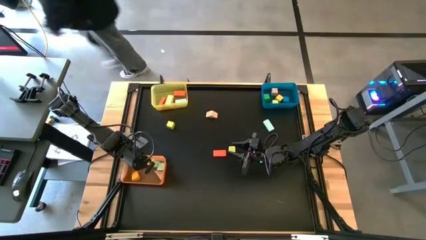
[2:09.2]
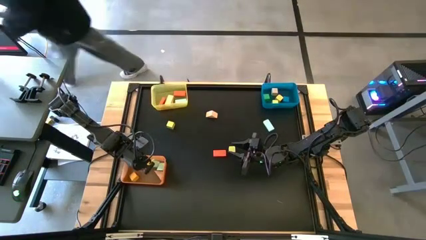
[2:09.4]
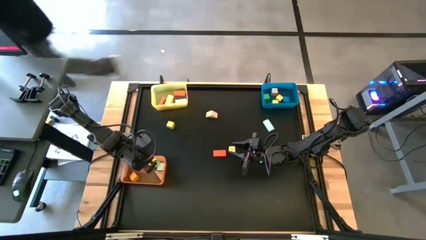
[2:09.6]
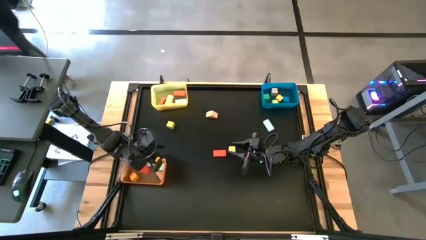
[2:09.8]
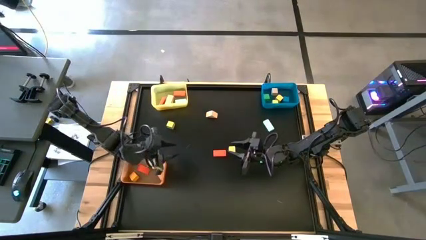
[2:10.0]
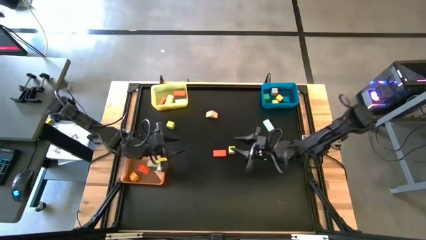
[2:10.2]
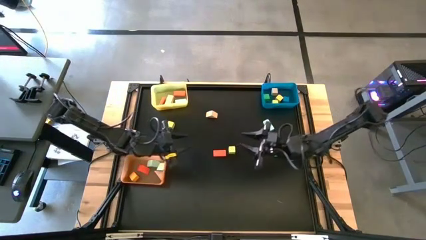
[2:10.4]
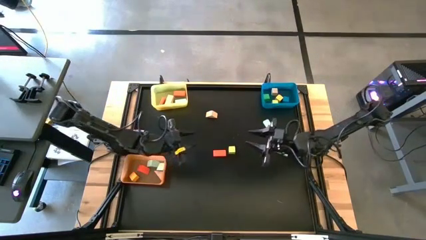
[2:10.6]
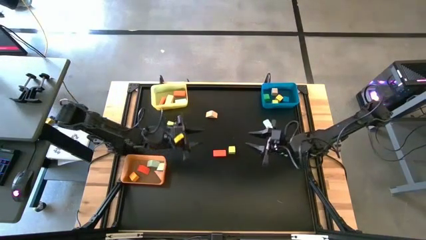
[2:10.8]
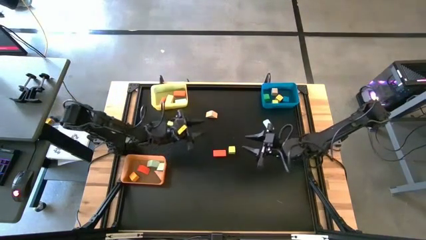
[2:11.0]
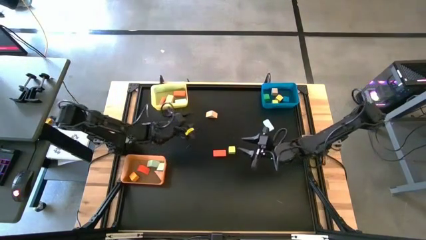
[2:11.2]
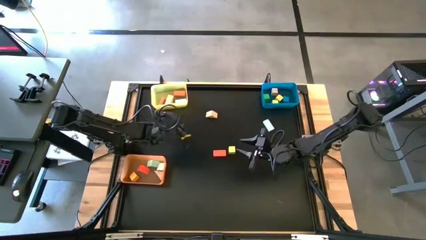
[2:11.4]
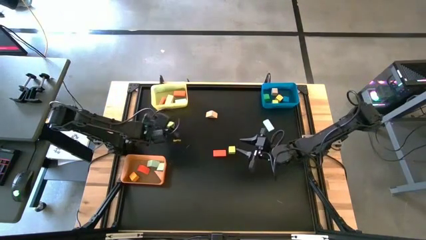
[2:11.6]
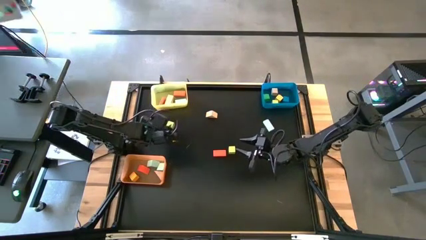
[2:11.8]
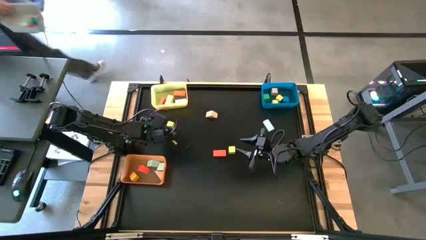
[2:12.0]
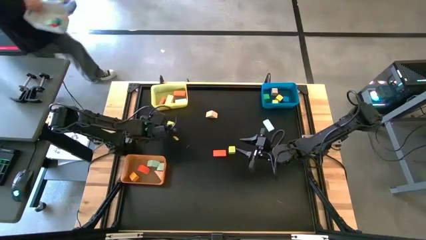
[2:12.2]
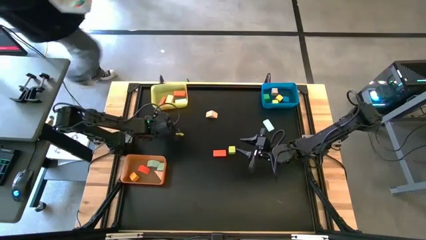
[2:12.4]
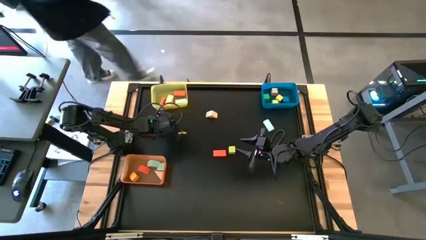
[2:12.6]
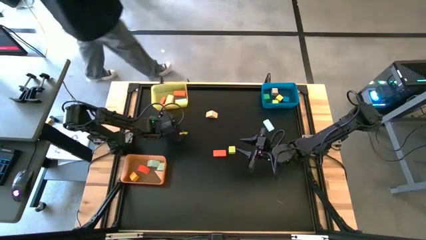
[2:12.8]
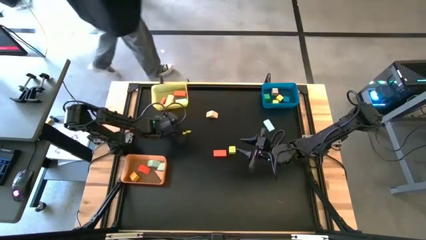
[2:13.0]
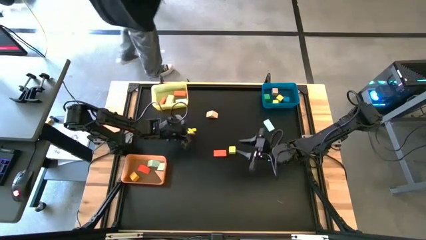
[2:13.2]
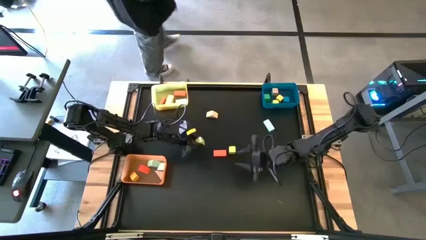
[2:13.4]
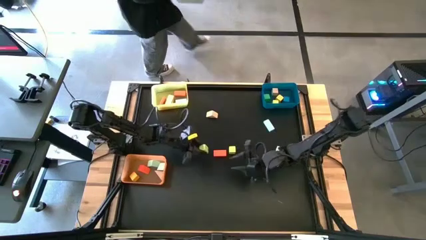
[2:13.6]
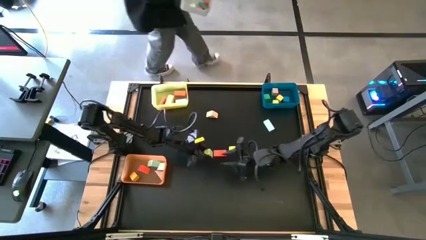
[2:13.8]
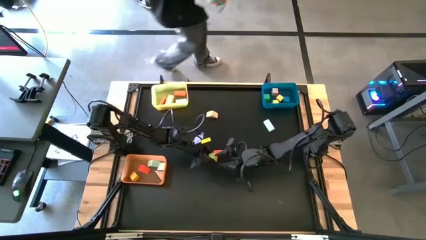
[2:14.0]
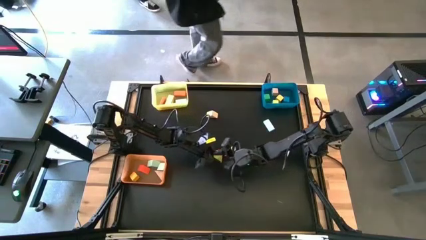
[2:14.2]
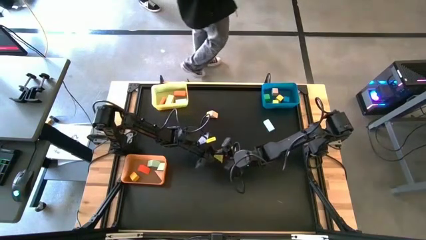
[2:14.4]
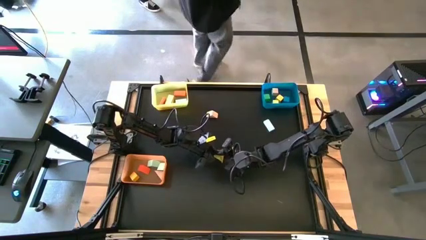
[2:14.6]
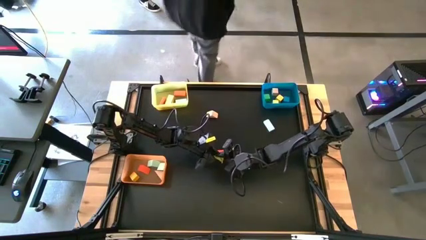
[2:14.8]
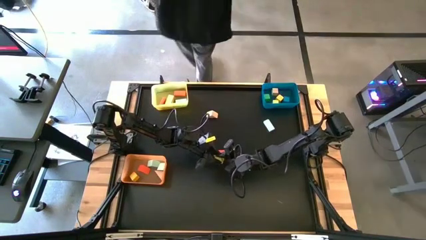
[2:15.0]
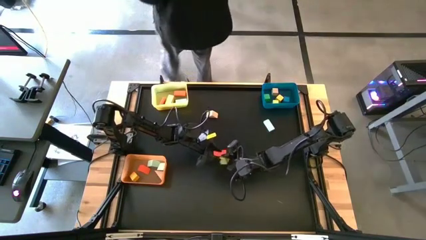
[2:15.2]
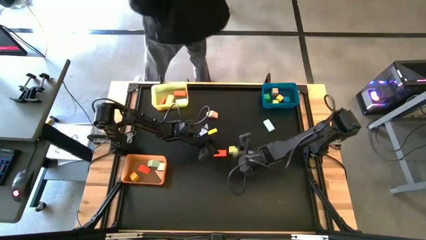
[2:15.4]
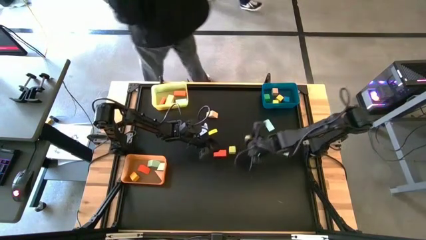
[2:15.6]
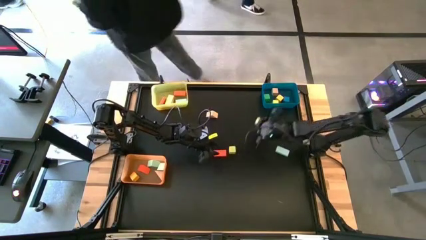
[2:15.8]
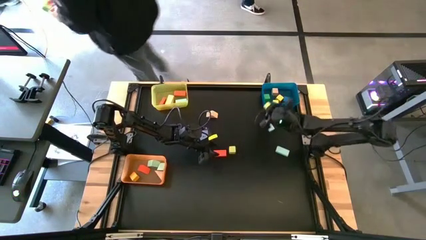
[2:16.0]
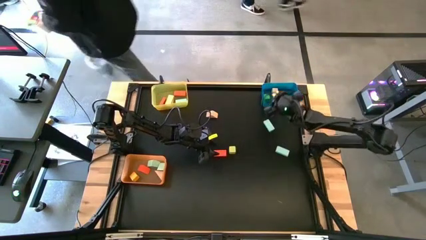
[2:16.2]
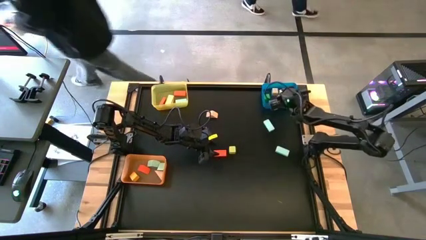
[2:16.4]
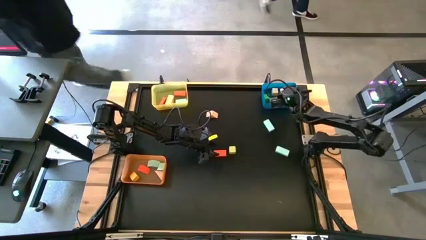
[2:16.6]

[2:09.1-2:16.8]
Task: Sort blocks by size
Put the yellow green wooden block into the blue bin

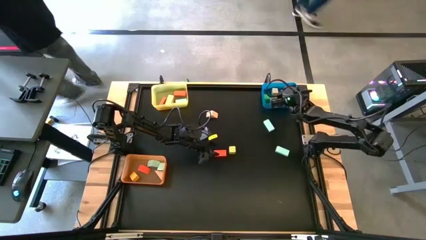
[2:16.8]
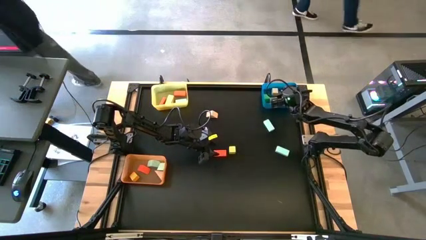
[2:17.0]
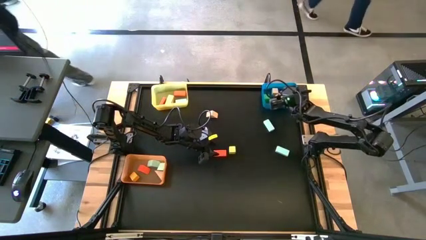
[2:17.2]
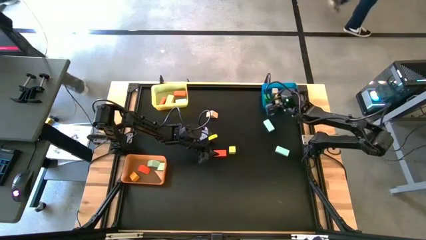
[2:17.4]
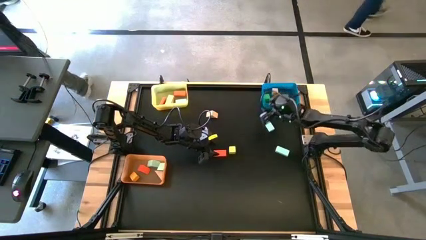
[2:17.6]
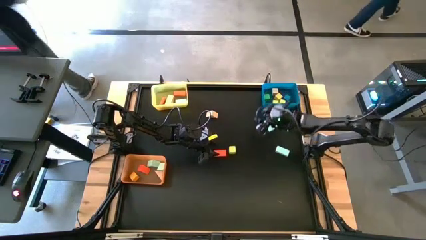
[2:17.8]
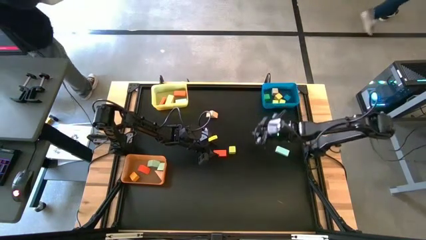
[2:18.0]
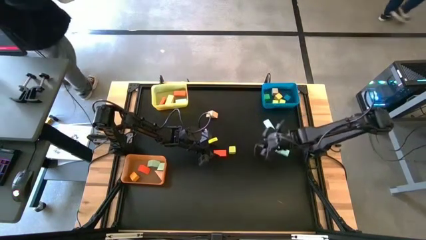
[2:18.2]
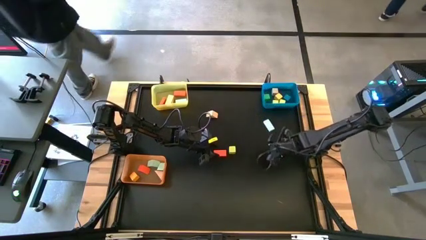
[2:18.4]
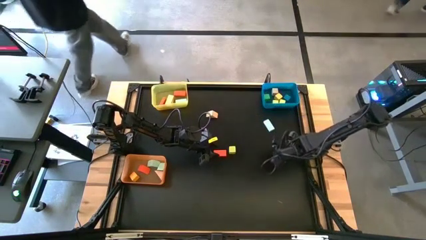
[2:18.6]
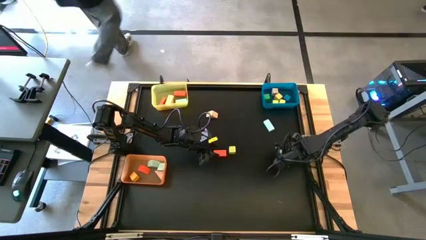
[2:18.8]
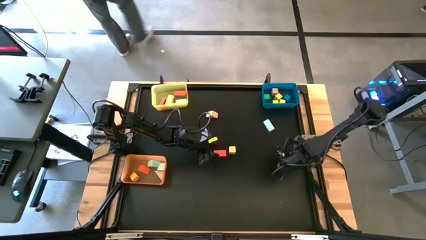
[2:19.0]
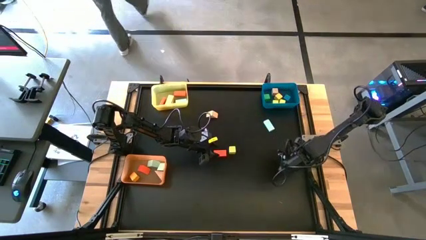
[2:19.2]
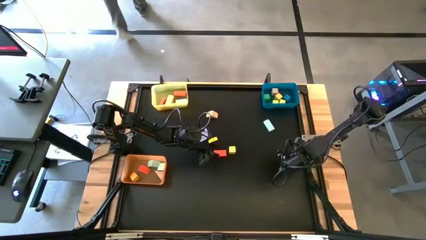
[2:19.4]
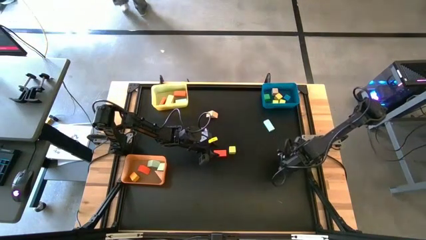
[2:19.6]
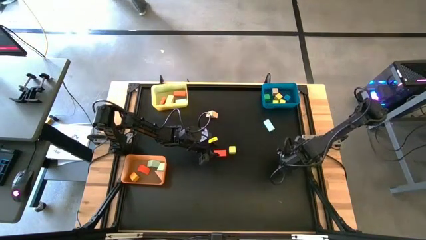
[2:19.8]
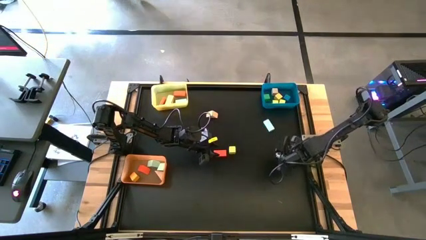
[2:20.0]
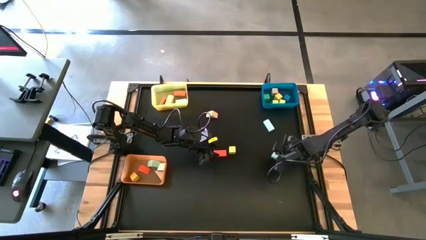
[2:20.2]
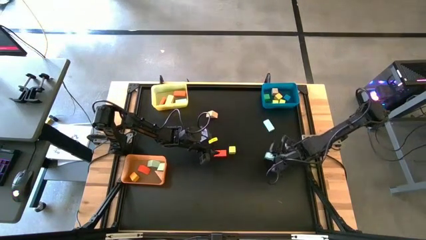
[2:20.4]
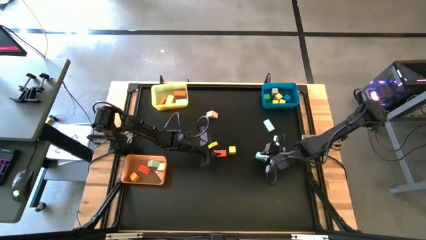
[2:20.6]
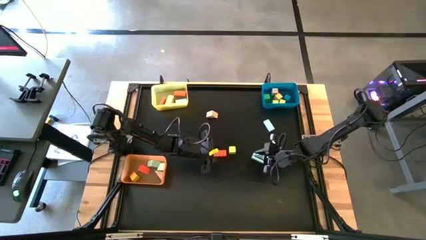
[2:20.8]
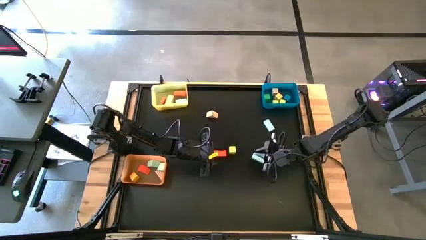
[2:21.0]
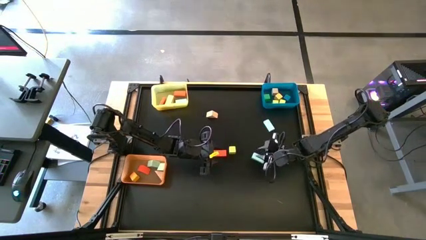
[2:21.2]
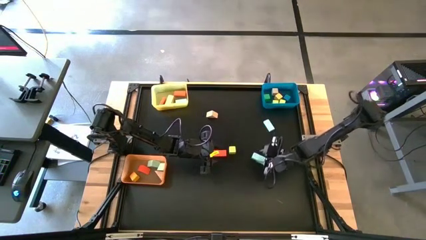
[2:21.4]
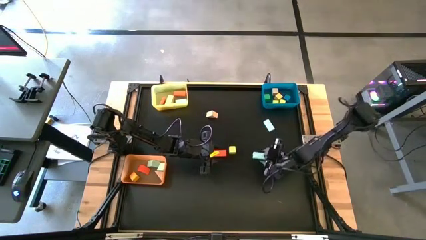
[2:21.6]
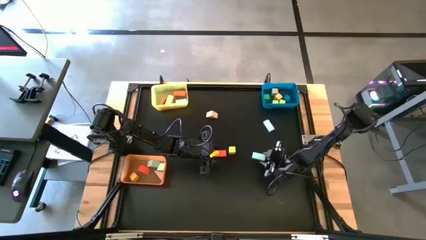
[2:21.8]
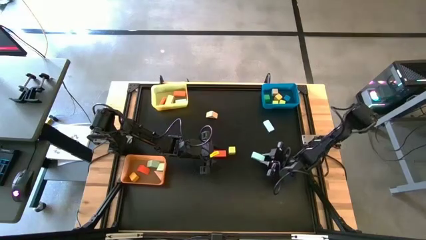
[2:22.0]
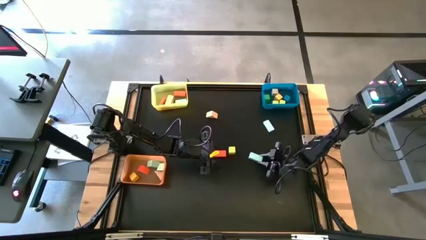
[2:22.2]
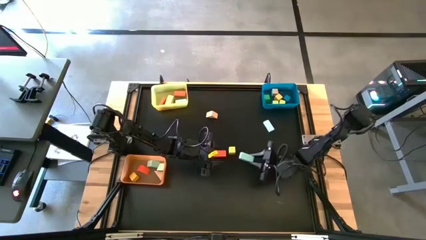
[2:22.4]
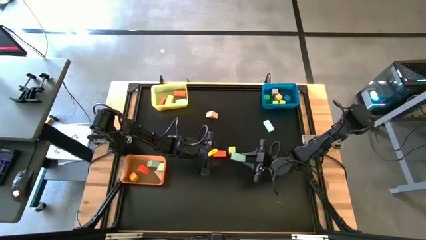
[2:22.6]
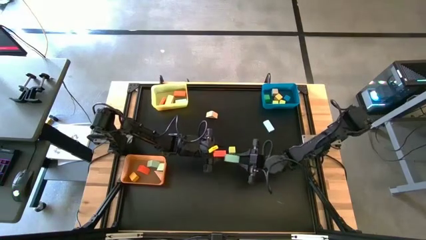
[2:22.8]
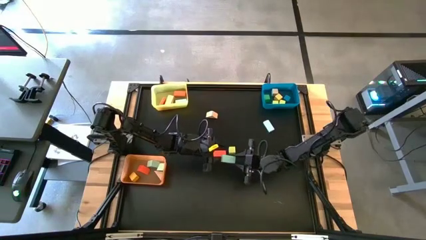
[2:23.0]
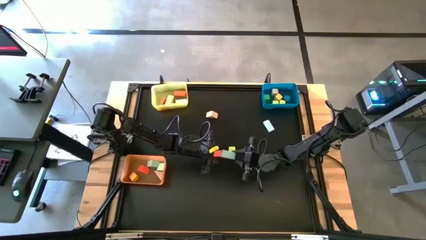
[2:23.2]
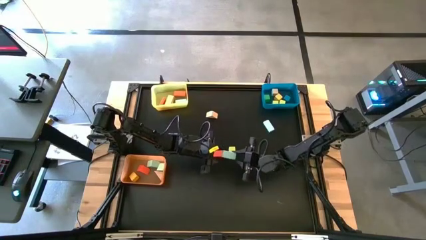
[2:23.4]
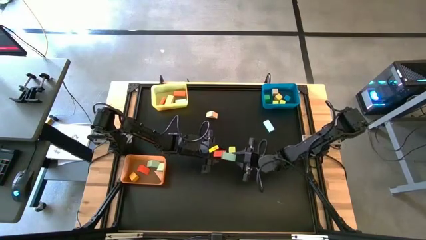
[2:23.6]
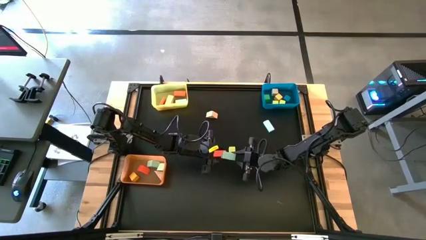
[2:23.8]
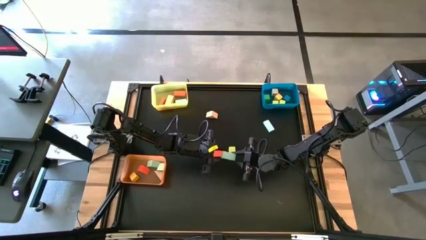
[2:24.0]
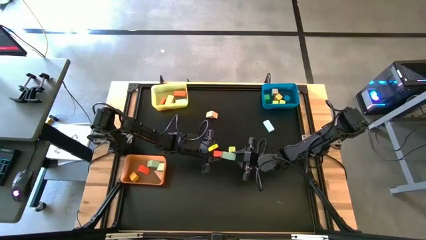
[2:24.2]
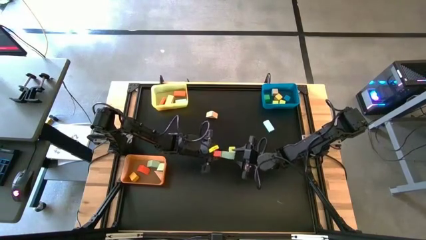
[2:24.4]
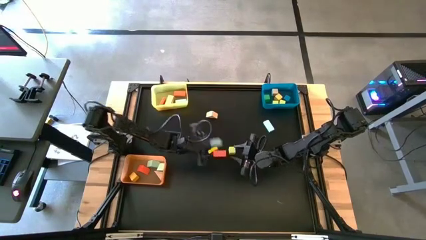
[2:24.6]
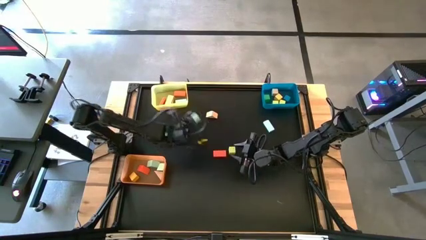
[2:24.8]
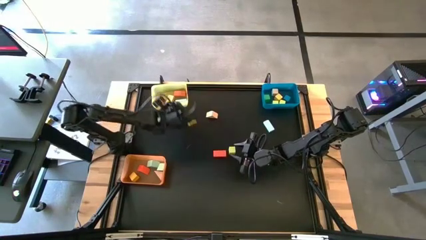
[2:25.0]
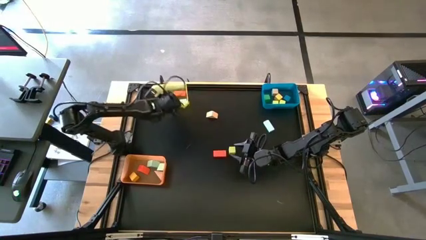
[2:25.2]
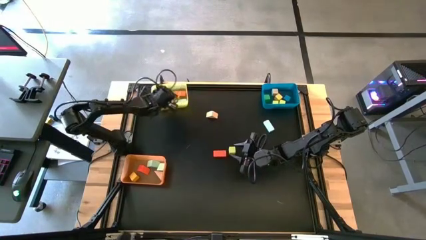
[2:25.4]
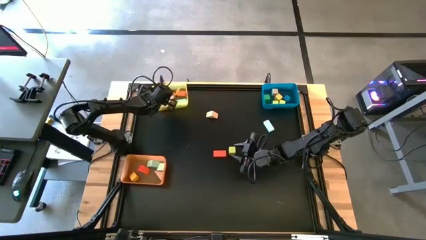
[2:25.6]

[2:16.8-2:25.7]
Put the light green wooden block into the yellow bin
